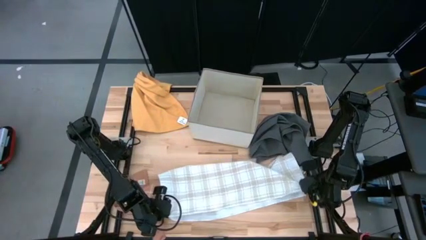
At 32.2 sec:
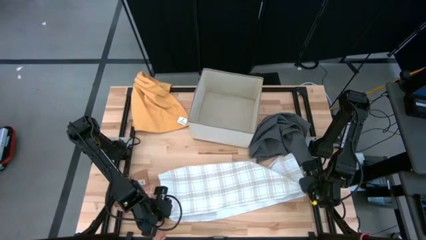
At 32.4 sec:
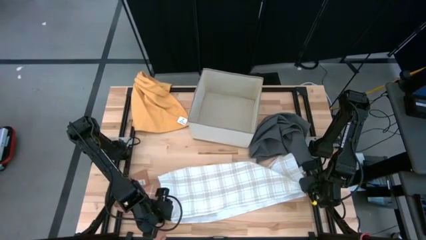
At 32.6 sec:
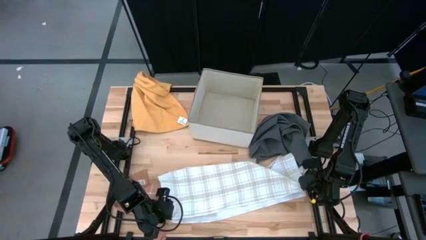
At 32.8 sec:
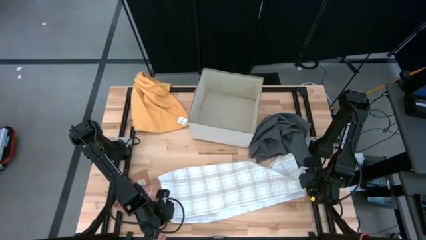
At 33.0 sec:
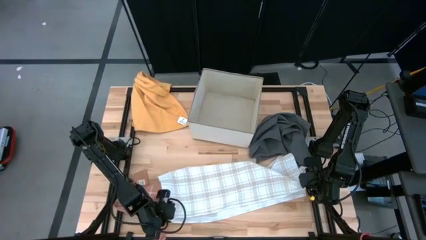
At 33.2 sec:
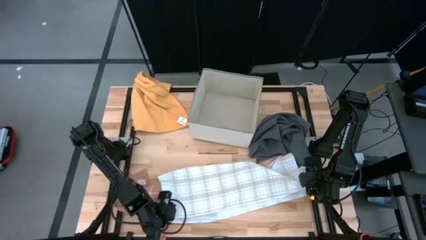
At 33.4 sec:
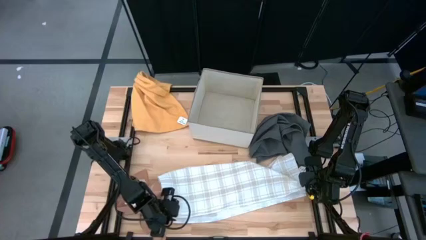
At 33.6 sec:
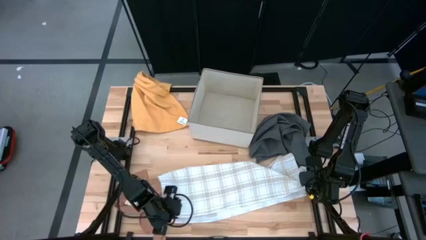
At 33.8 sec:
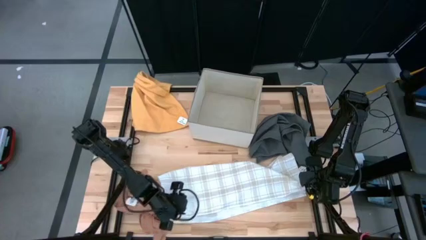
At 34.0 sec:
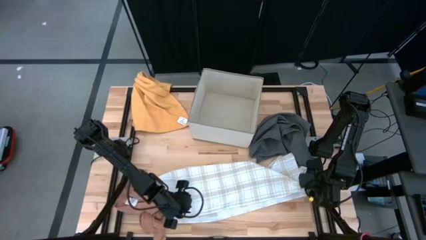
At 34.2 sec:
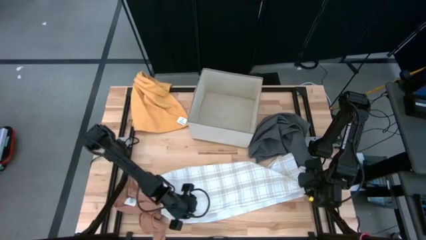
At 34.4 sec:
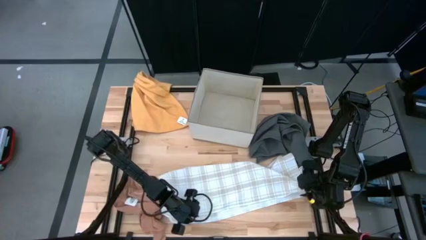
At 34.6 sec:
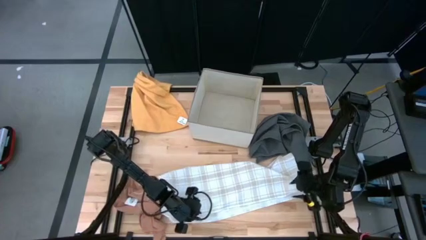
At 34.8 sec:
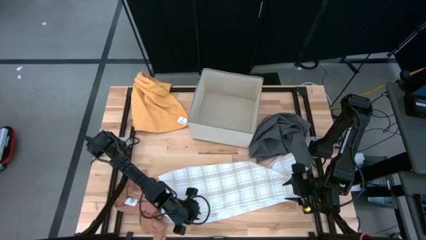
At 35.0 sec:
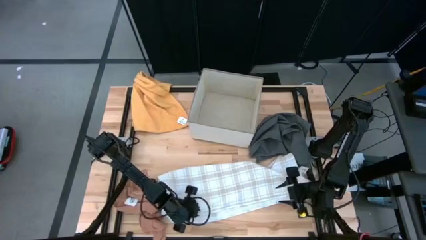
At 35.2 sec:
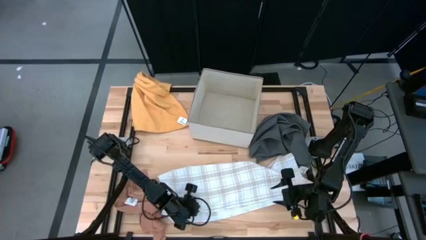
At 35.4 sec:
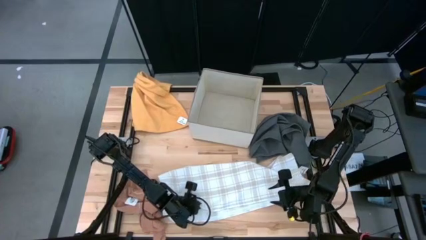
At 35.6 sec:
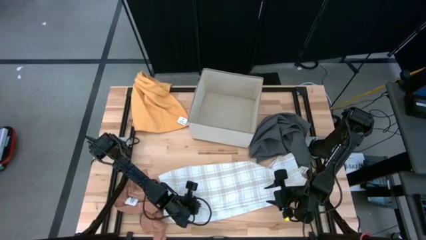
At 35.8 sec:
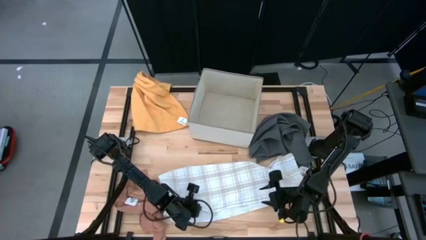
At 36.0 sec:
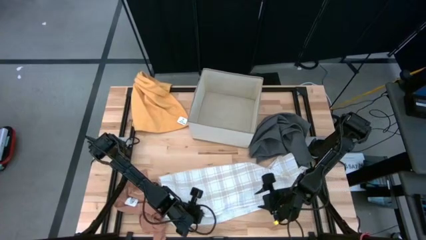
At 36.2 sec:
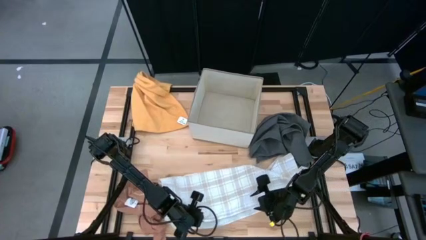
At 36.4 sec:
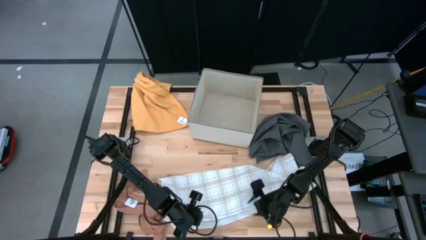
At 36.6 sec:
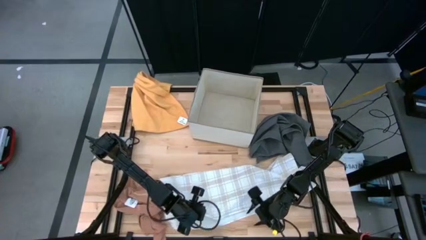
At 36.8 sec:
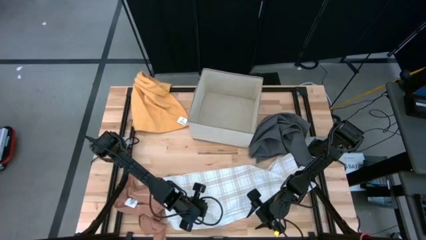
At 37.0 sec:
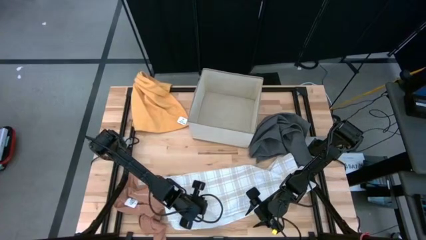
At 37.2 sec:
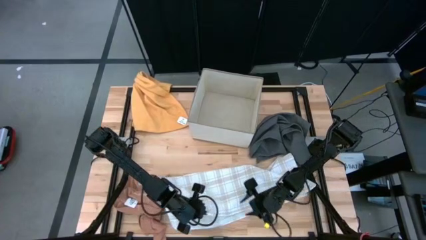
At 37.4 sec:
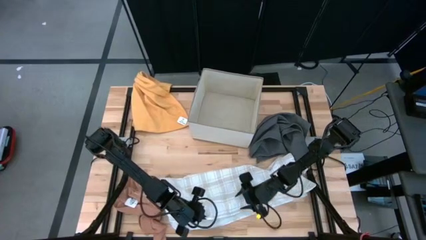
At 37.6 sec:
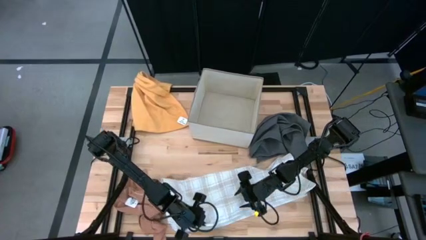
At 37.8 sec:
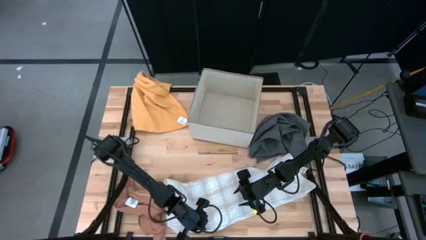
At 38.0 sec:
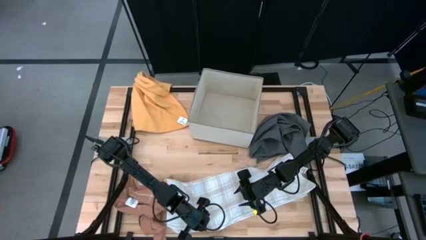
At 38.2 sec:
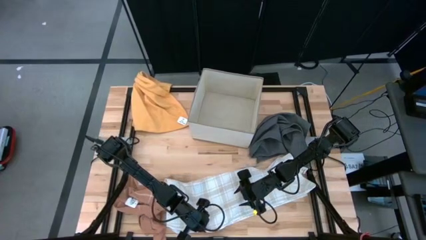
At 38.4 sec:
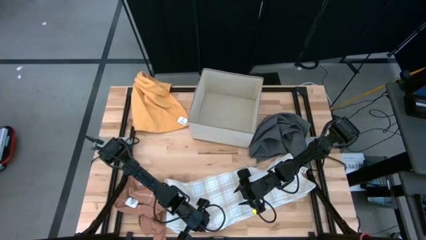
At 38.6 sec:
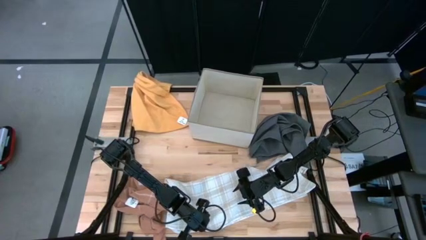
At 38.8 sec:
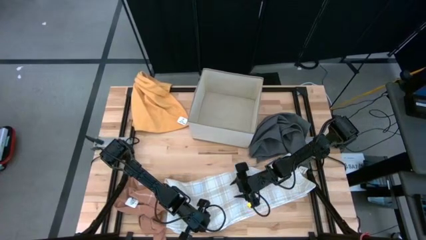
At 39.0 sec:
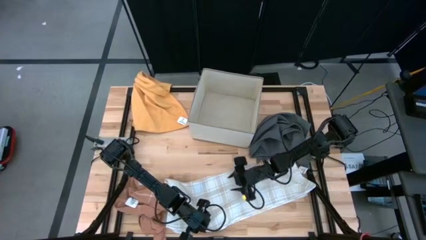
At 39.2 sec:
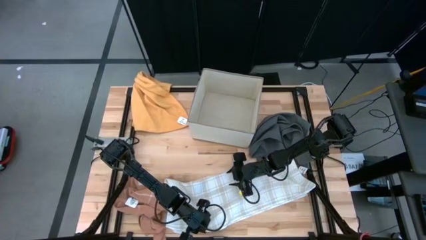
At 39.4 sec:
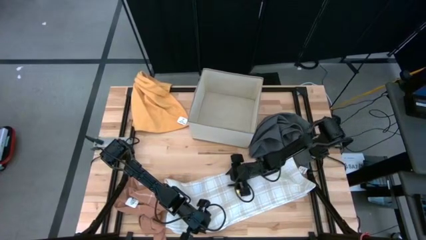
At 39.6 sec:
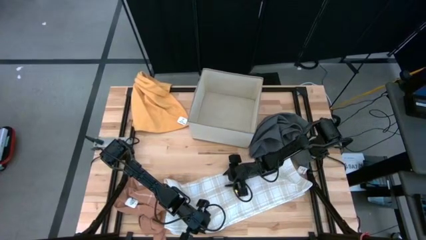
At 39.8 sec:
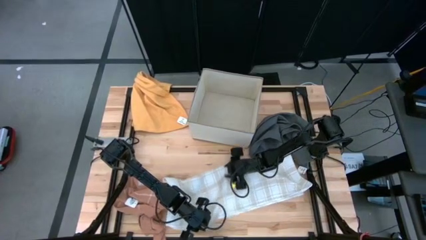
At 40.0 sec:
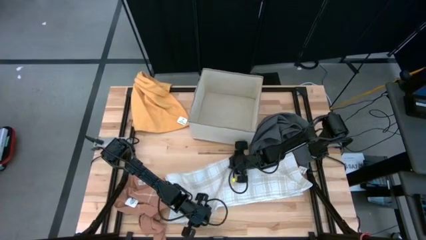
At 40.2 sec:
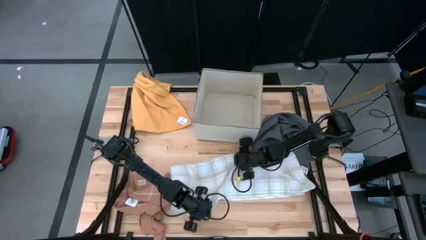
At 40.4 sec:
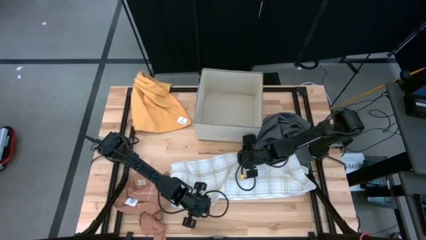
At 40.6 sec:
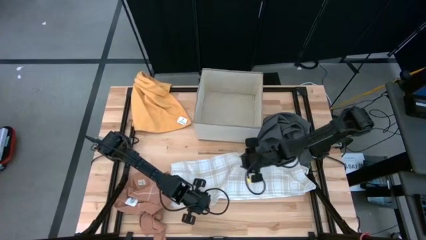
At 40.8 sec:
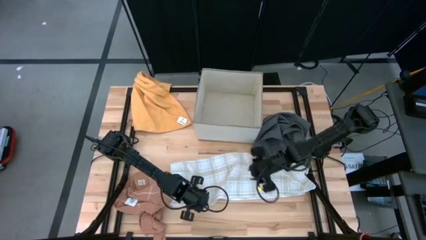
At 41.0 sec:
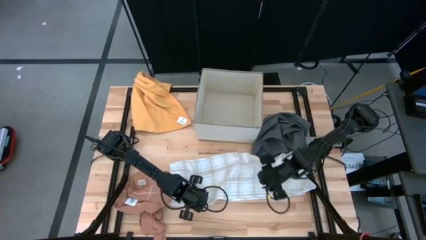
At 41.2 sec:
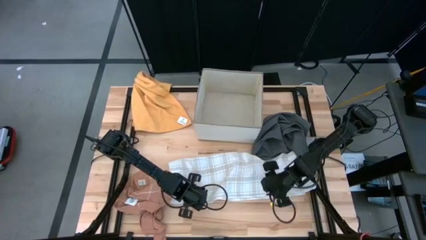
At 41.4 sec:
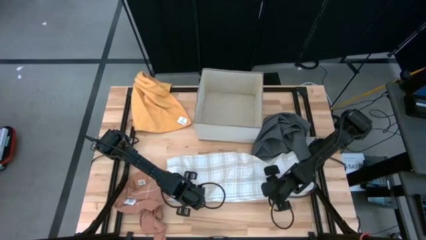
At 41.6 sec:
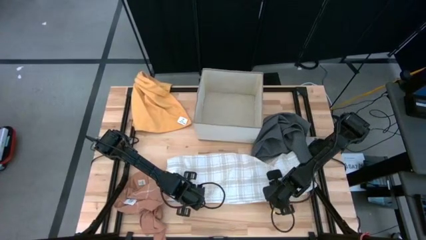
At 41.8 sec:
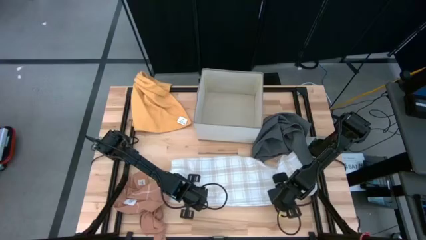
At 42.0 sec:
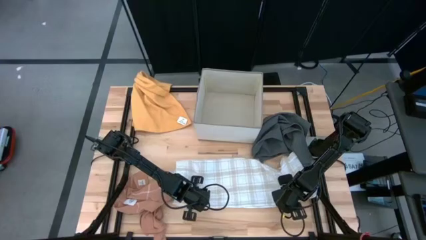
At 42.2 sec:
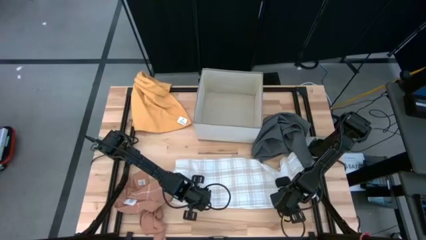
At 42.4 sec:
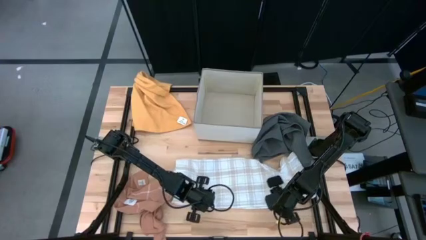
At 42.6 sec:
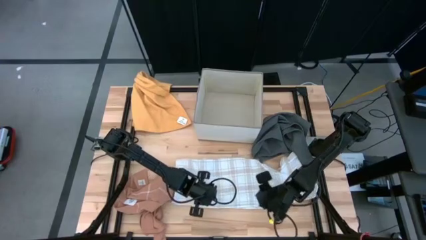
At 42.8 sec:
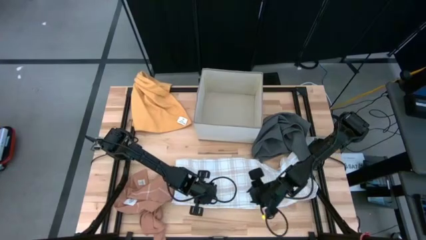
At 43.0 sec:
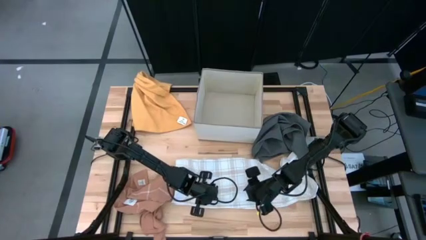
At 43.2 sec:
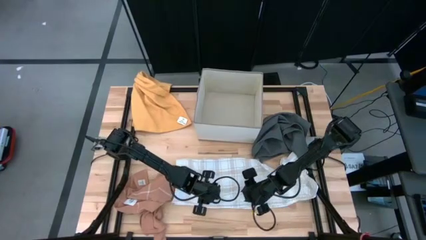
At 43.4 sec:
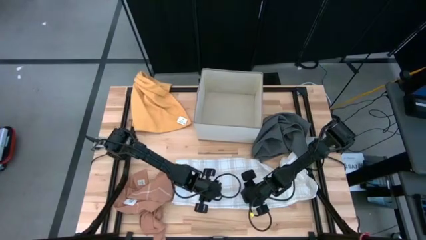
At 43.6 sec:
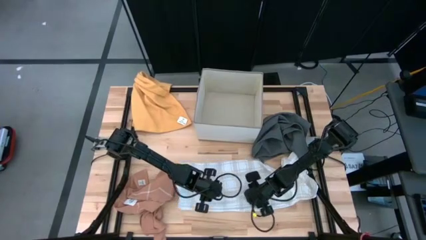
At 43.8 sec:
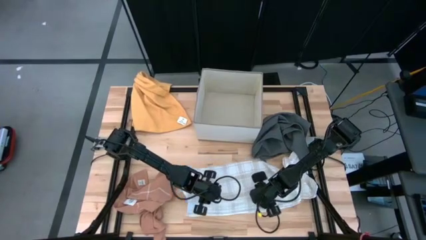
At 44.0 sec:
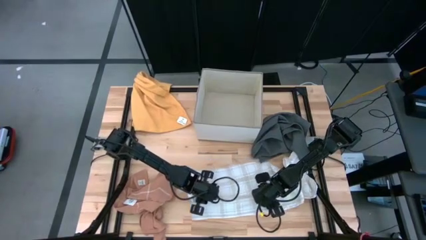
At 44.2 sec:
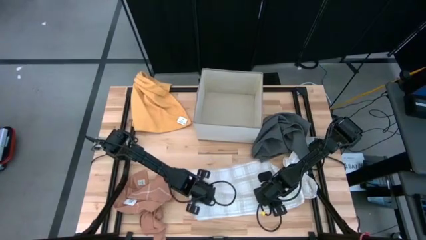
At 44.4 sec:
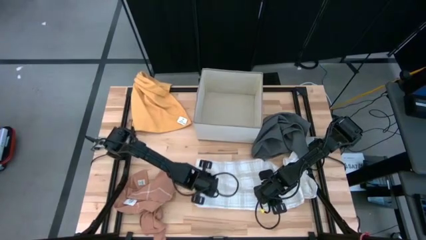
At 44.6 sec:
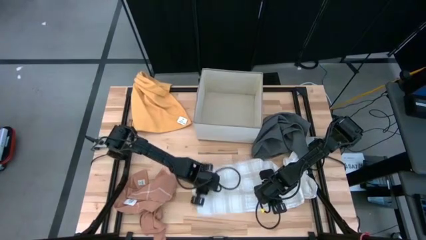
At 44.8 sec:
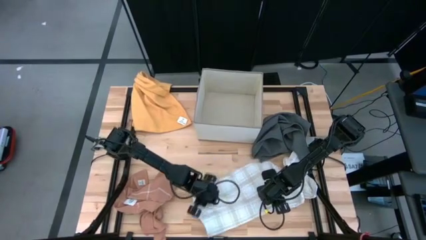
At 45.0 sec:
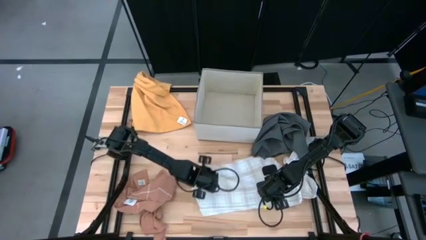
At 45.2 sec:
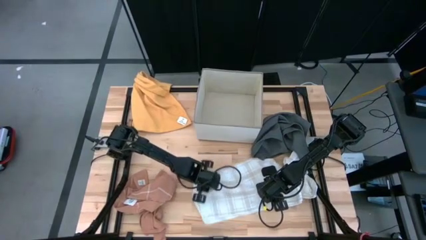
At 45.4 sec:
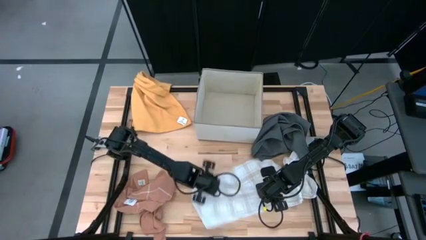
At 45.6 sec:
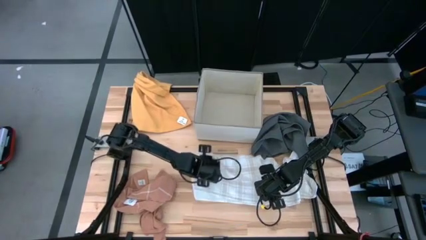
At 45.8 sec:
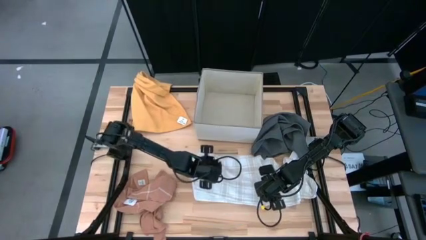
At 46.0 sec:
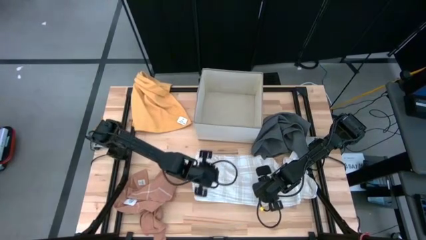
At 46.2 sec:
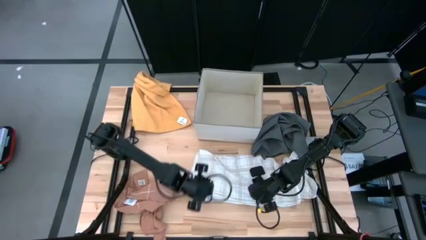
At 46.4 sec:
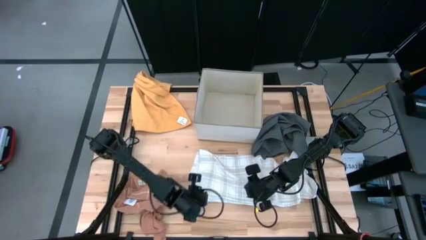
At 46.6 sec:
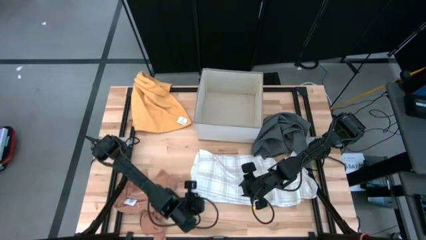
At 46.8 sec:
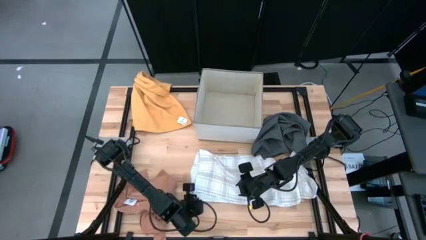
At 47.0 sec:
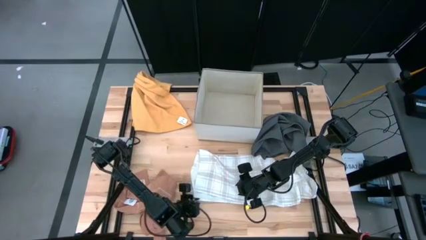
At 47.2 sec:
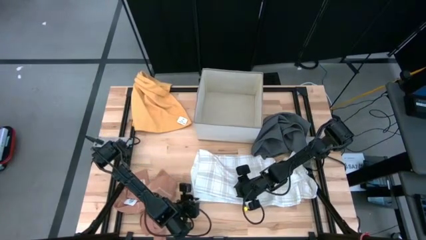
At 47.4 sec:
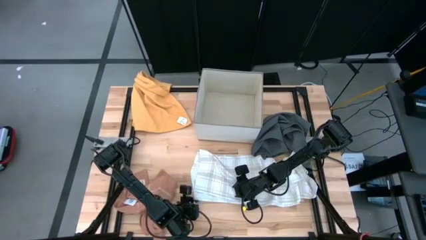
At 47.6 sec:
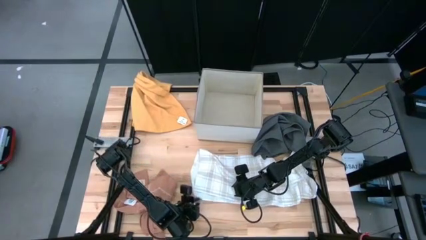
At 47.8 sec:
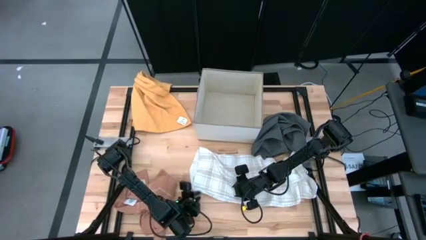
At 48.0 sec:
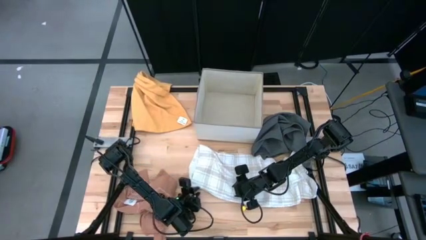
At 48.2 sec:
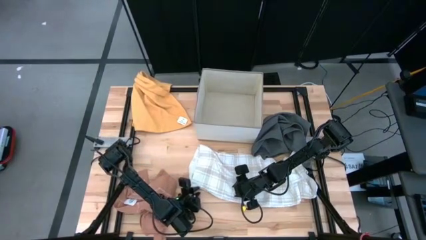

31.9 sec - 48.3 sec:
Task: Fold towel
Fold the white towel
